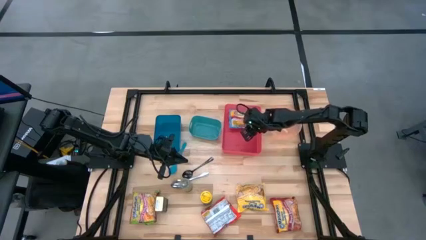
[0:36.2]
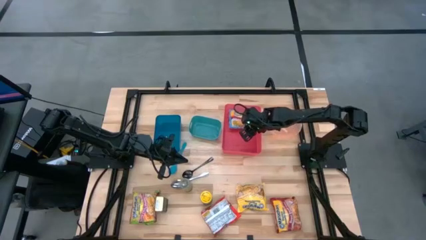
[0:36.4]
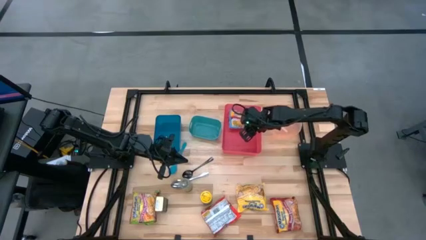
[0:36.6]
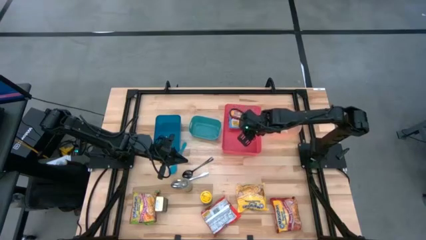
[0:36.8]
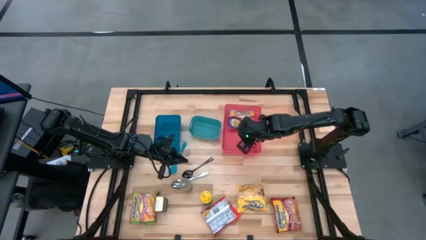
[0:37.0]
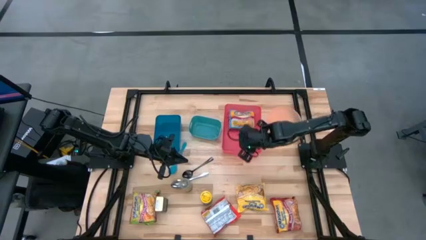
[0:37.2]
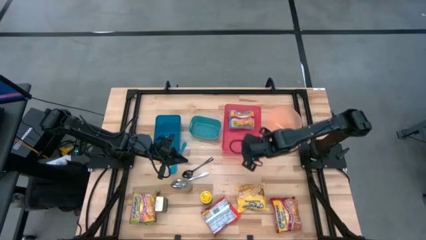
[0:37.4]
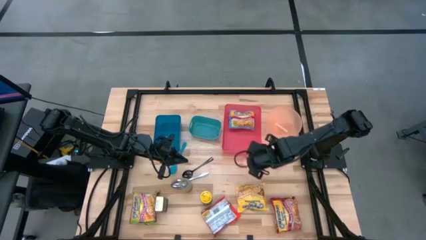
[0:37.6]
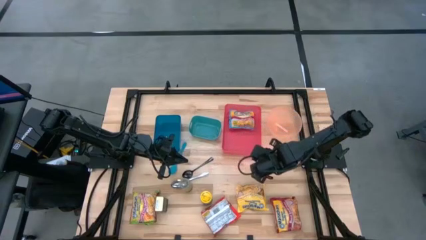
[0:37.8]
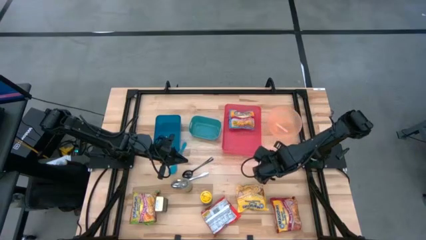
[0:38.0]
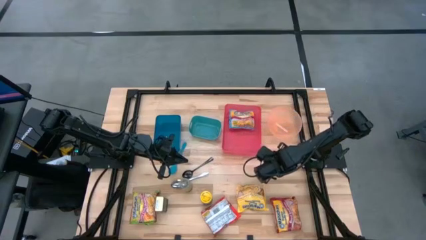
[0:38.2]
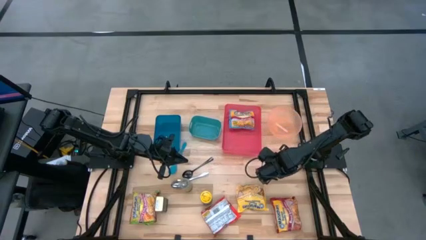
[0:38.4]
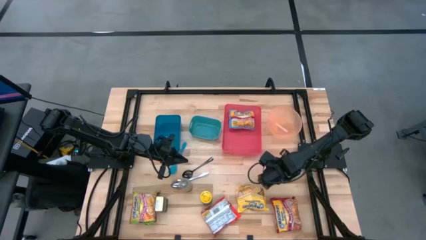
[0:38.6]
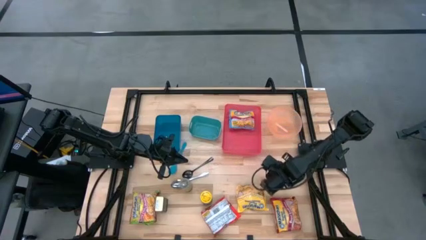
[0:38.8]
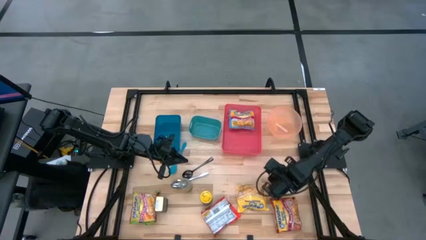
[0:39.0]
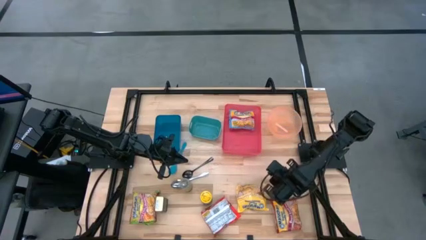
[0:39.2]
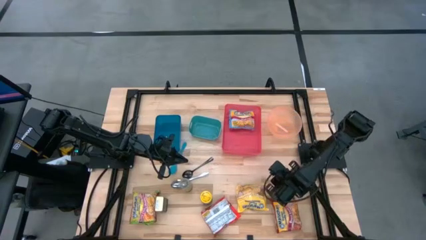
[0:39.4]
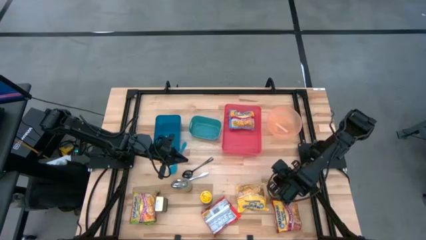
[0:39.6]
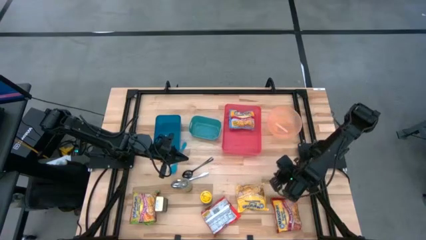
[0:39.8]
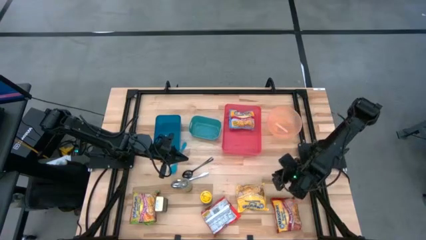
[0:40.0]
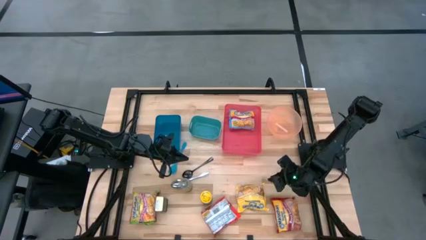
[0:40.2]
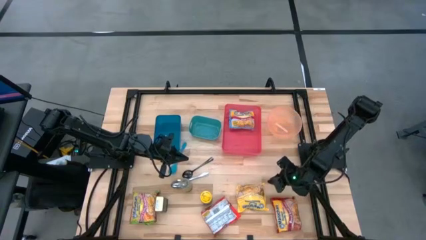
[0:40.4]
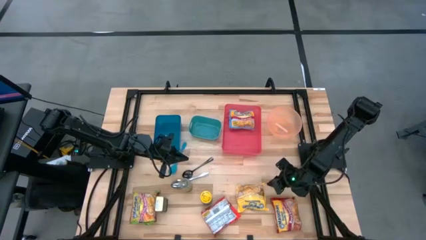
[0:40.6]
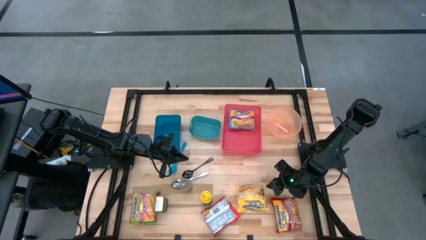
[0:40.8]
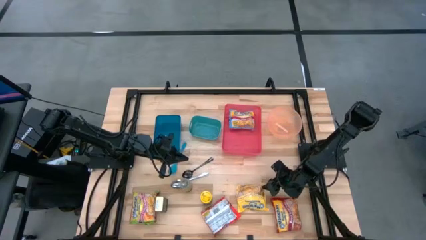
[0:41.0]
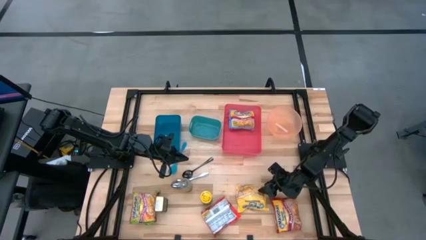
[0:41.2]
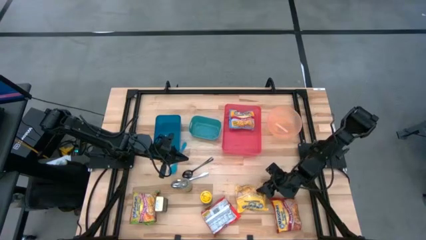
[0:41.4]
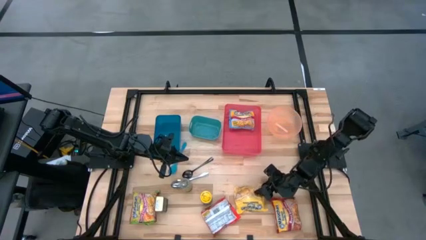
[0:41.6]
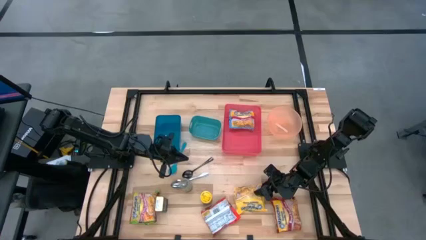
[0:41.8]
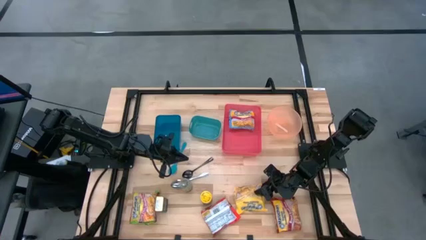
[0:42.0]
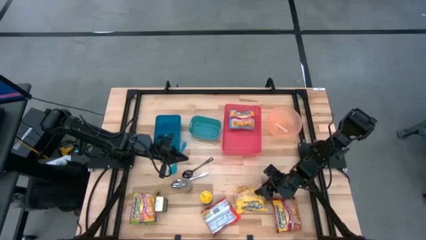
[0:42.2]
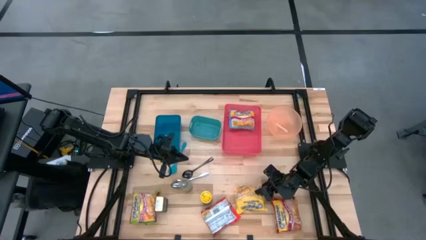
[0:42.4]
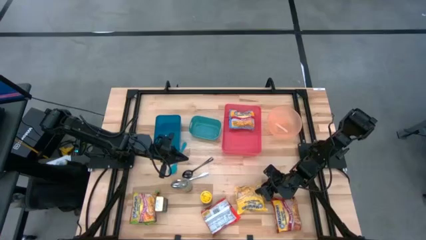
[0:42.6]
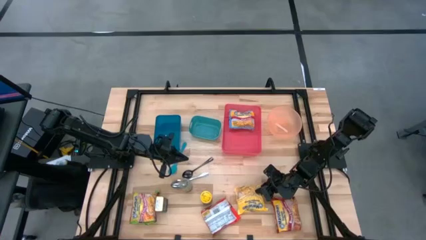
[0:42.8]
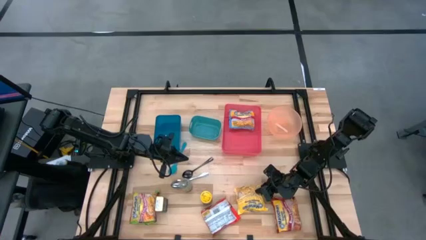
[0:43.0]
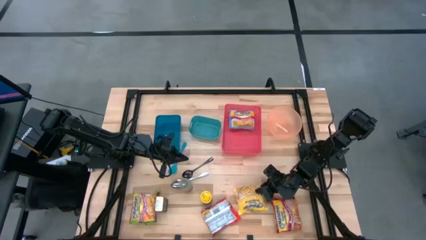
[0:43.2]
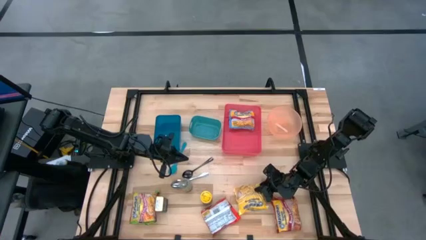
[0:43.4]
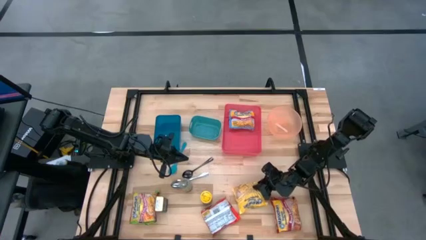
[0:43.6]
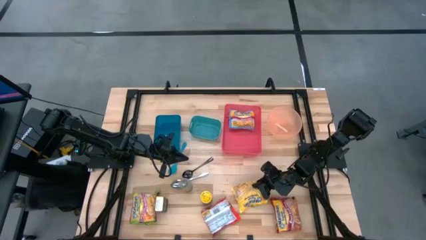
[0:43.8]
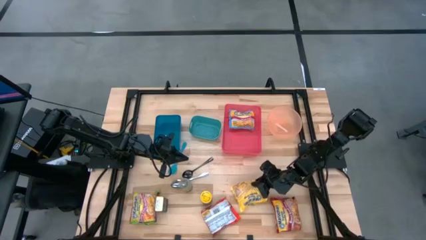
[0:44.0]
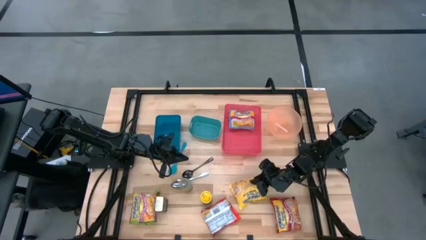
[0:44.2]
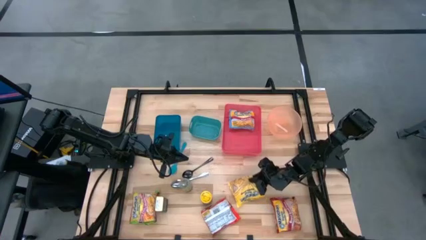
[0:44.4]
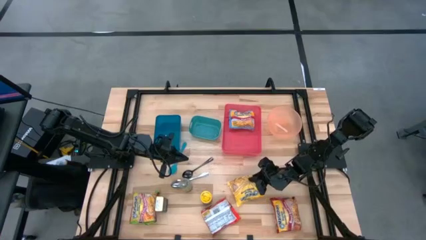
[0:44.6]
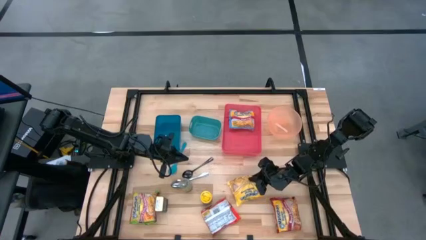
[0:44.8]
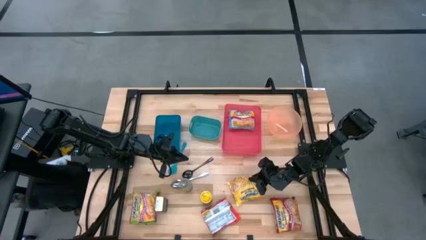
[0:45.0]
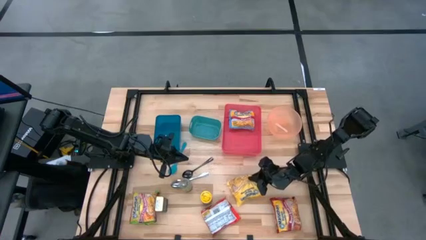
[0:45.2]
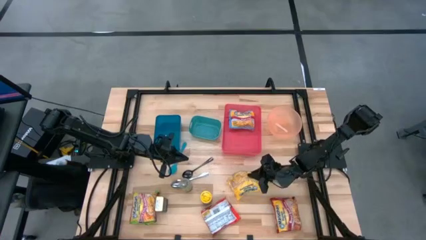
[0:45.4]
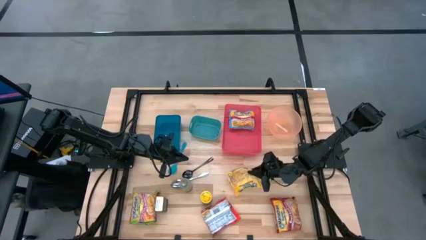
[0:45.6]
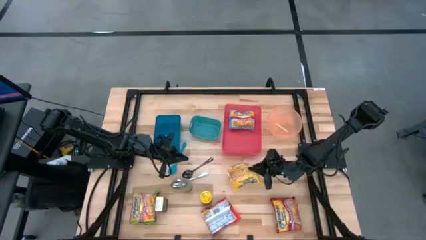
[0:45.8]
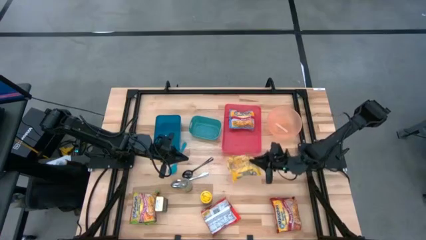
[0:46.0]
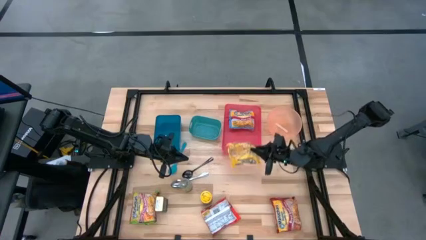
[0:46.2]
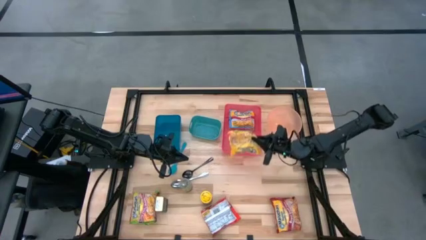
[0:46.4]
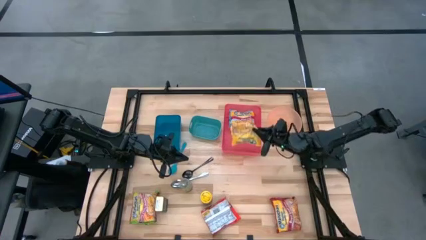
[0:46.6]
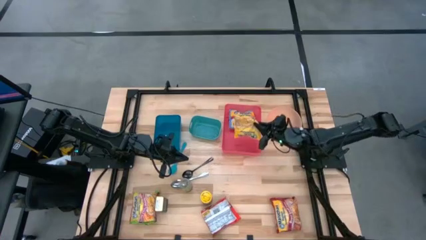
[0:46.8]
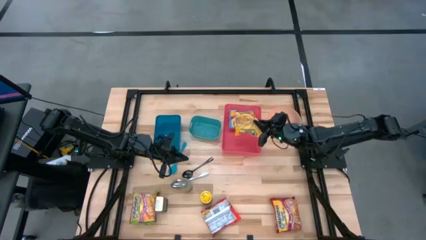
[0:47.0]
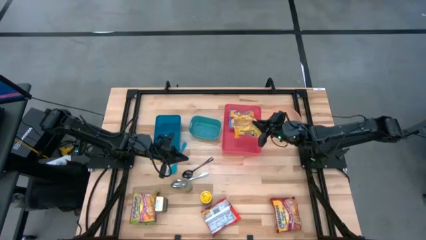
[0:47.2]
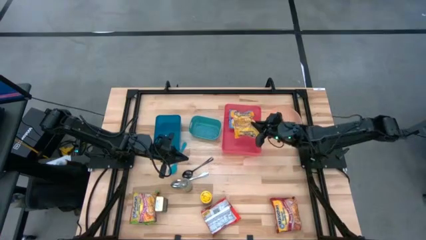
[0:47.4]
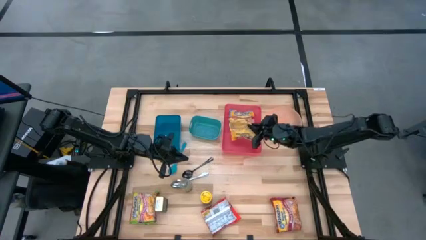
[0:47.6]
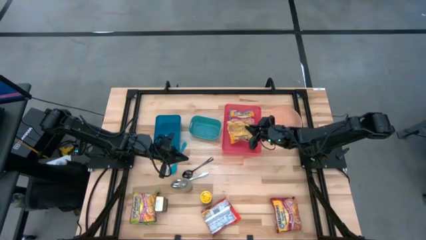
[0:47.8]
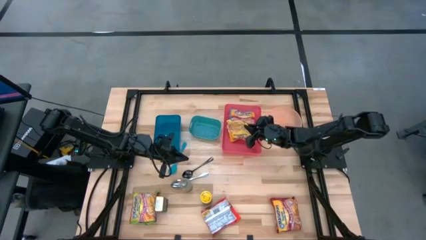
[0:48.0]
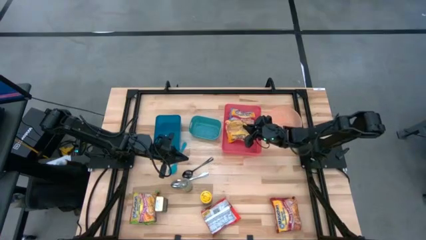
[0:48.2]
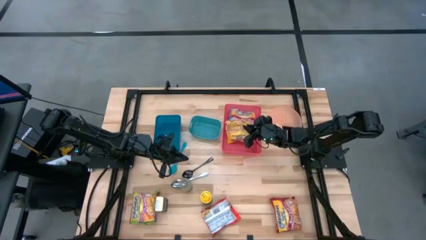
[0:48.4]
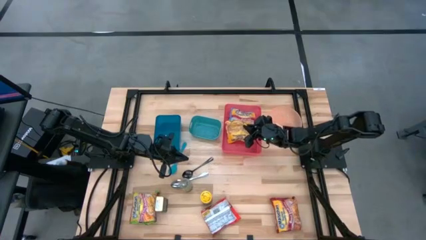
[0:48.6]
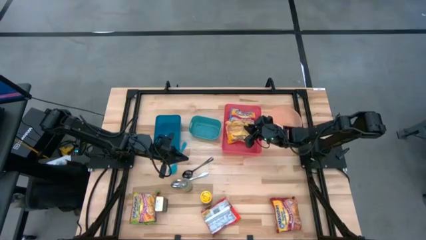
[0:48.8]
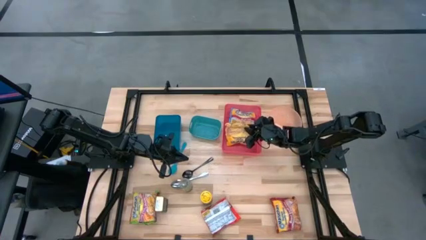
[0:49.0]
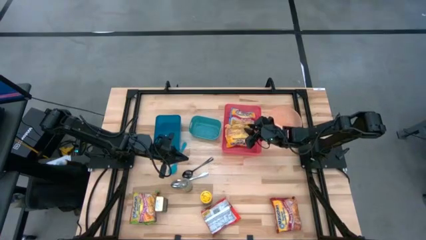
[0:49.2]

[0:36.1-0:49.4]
Task: Pick & Place Food Item
Put the yellow noodle pack into the red bin

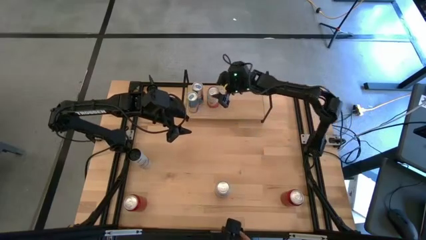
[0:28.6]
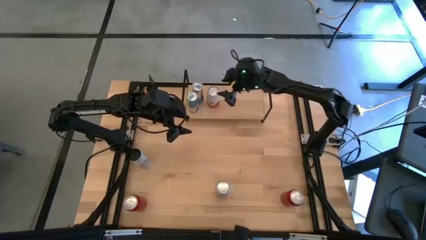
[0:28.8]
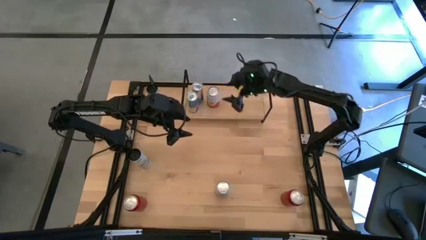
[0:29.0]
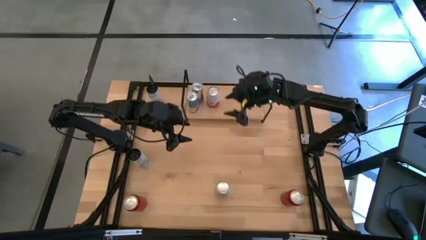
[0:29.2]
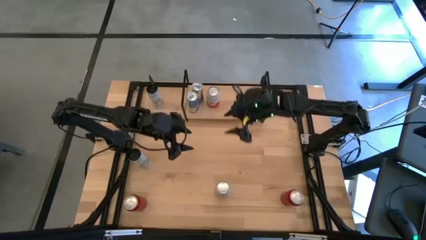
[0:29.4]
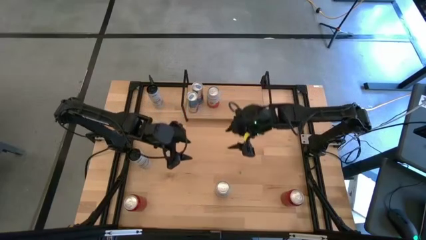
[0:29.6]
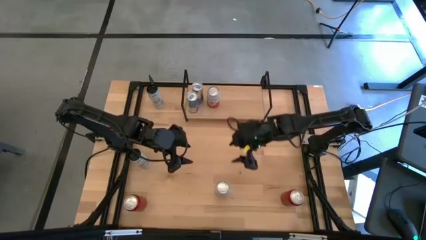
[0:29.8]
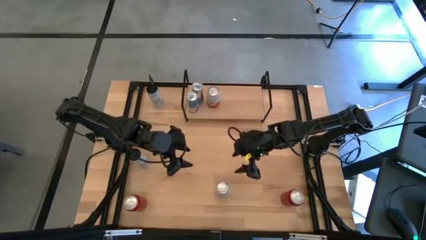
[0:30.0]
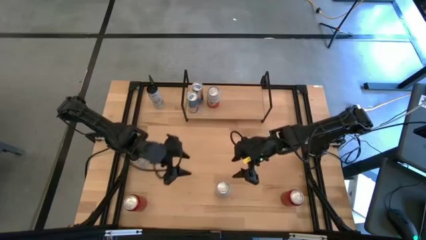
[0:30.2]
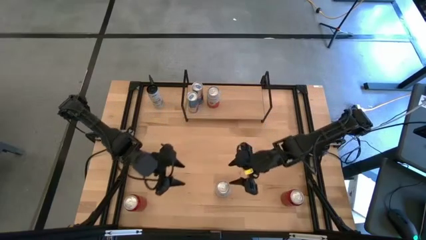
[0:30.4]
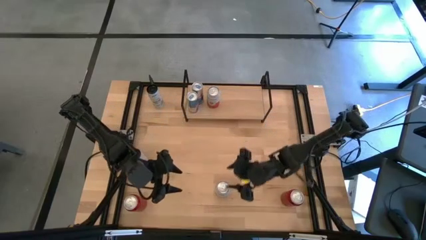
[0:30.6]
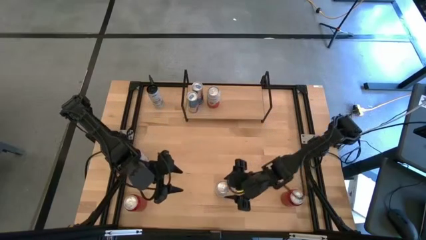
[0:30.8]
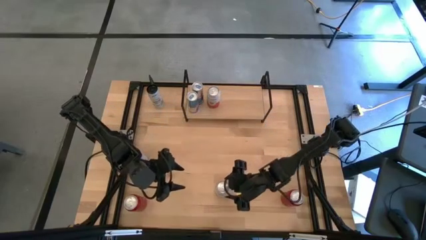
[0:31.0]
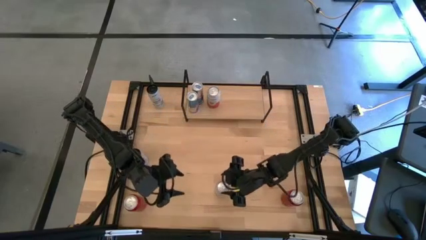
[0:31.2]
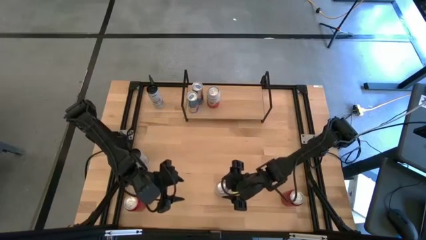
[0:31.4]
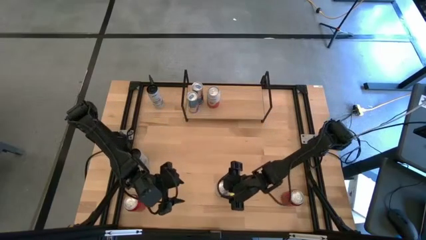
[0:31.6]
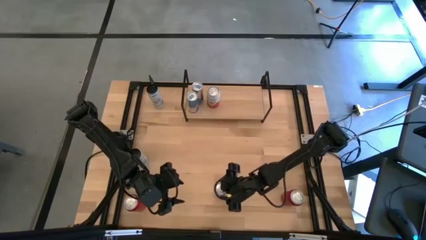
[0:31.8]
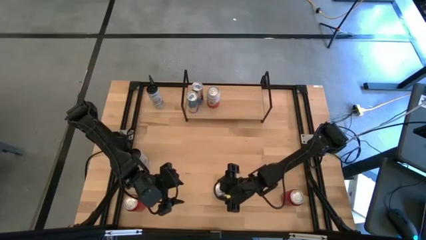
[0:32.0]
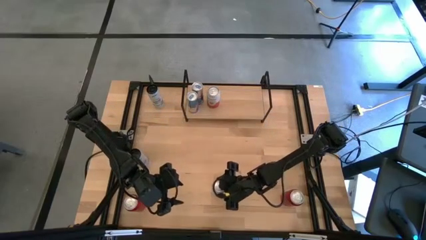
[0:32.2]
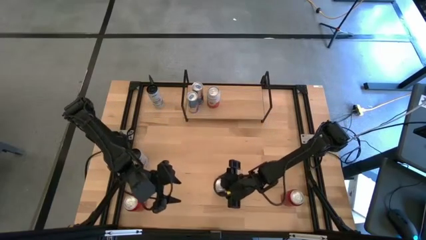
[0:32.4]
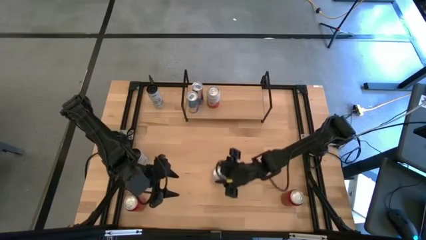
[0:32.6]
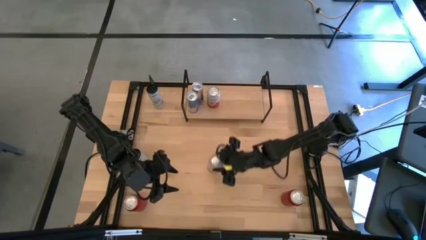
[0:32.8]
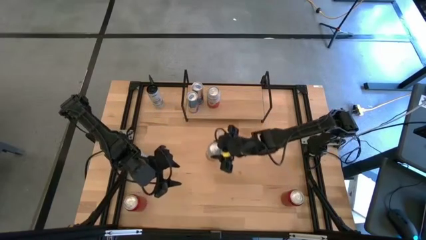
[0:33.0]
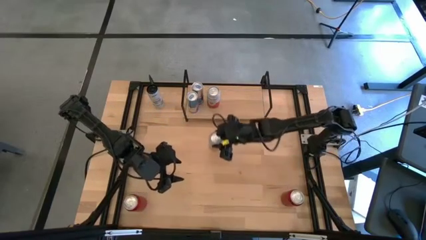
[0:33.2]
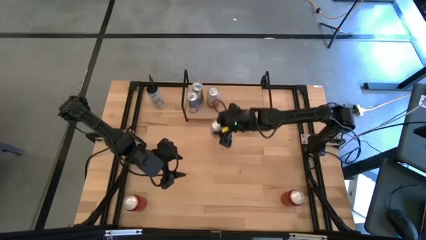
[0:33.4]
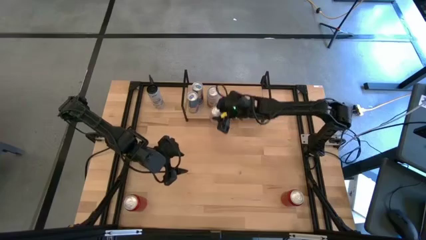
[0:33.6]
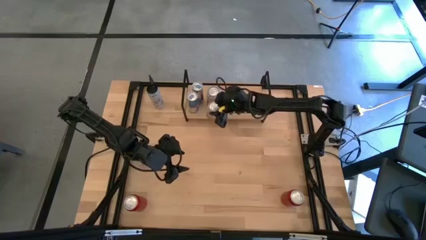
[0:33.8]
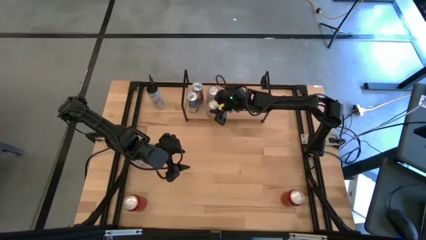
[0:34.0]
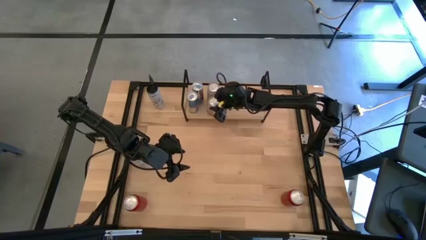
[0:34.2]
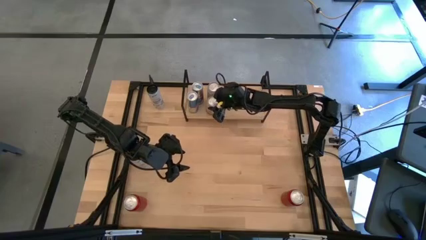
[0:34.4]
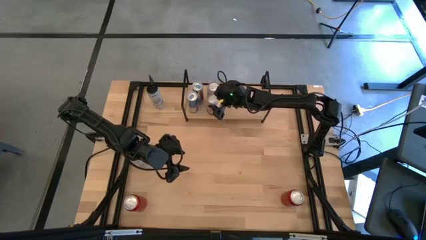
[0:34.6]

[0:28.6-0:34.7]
Task: Place canned beverage on shelf
Put the pink soda can on the shelf aligned with the other pink soda can
